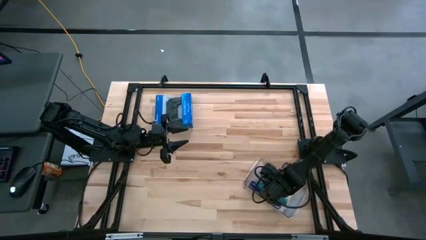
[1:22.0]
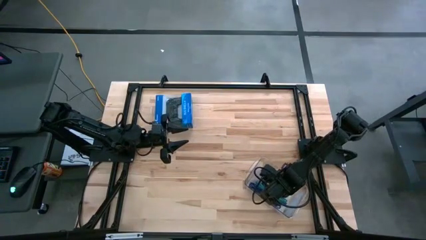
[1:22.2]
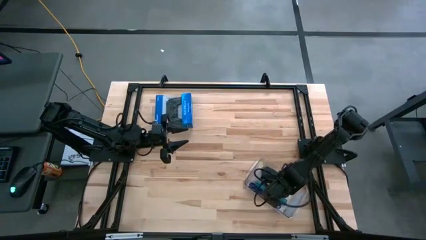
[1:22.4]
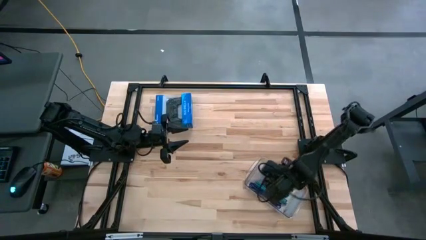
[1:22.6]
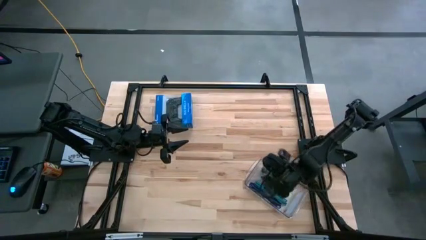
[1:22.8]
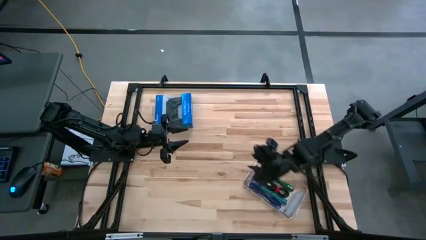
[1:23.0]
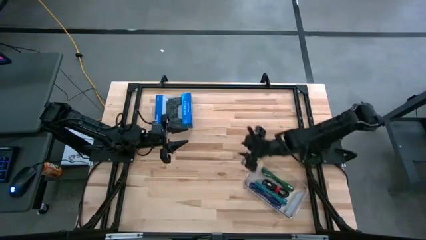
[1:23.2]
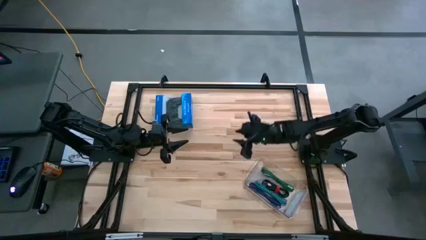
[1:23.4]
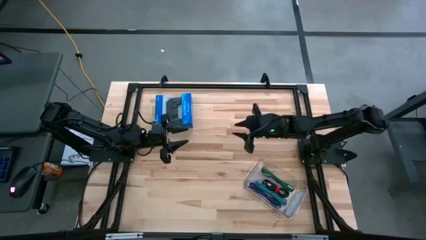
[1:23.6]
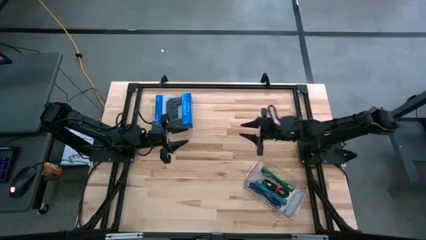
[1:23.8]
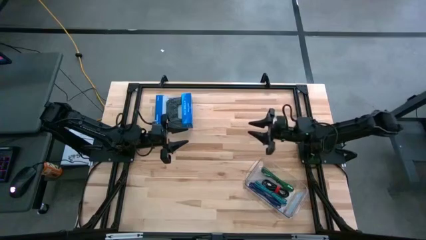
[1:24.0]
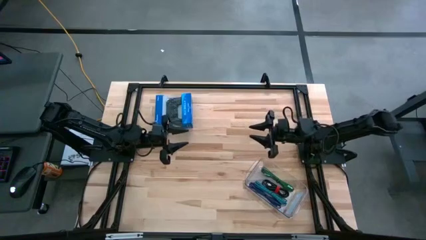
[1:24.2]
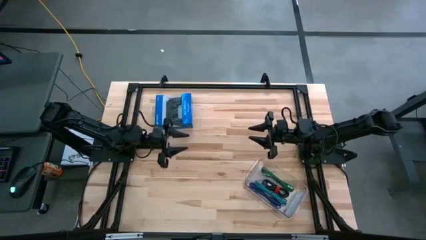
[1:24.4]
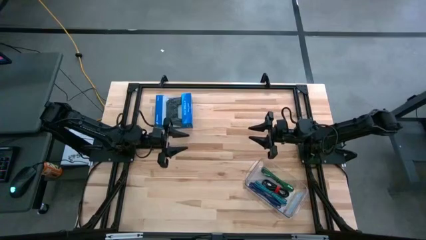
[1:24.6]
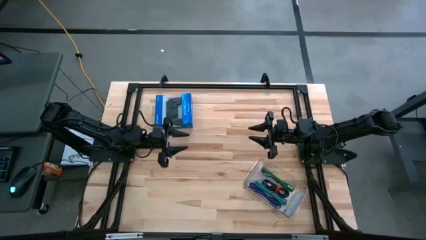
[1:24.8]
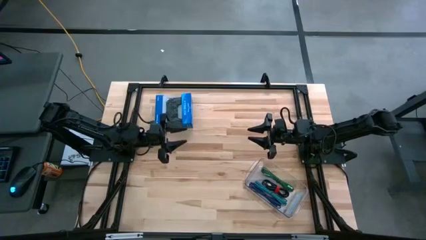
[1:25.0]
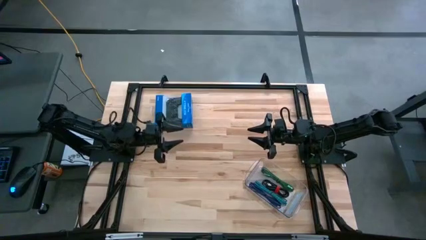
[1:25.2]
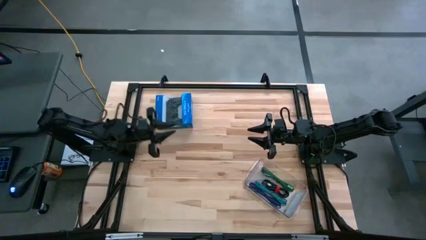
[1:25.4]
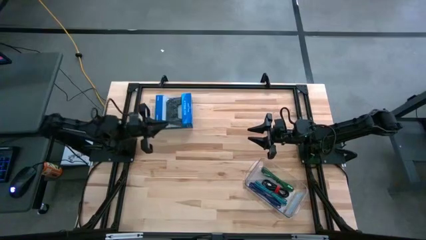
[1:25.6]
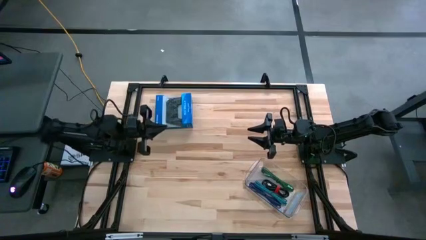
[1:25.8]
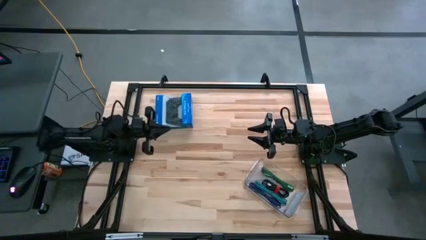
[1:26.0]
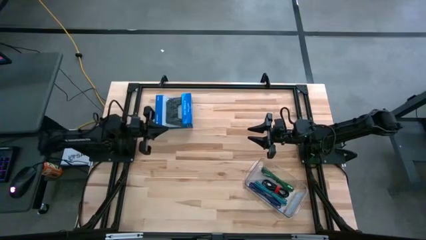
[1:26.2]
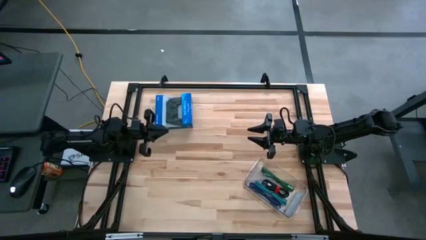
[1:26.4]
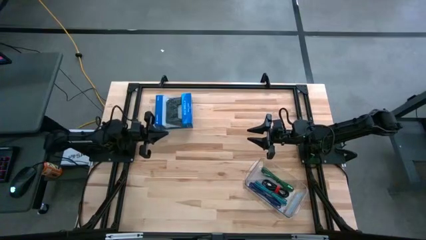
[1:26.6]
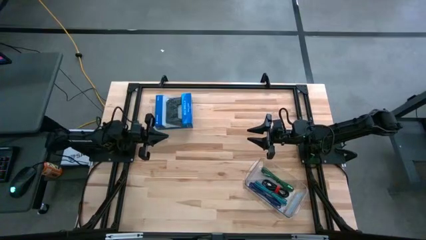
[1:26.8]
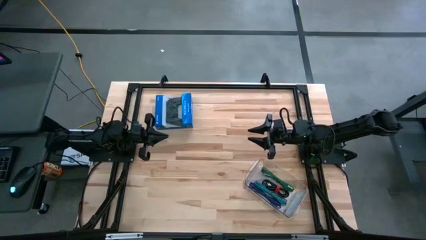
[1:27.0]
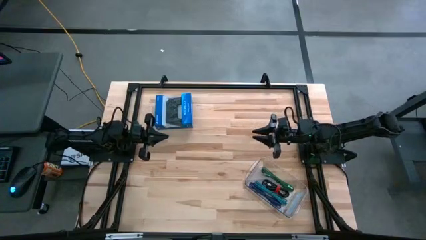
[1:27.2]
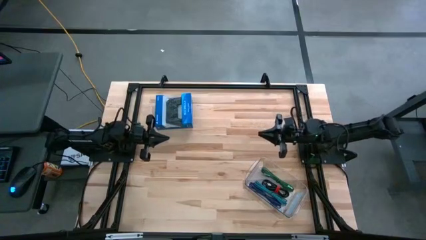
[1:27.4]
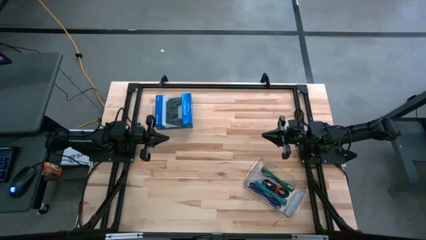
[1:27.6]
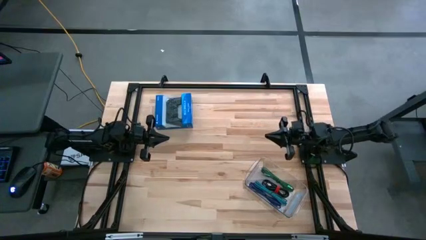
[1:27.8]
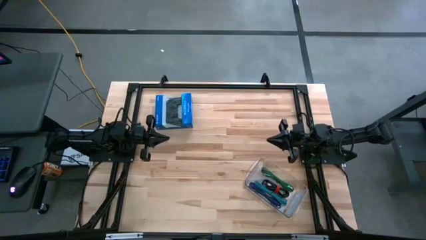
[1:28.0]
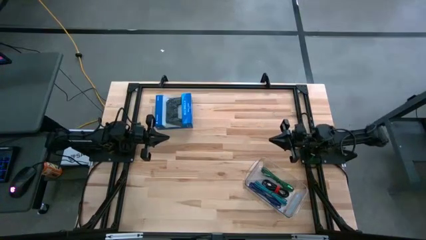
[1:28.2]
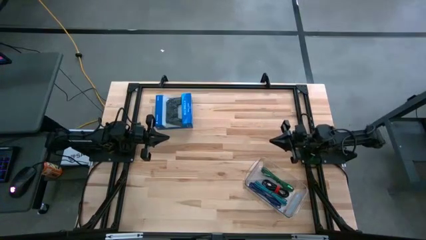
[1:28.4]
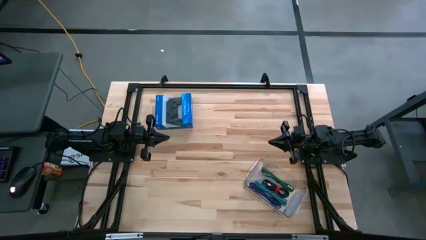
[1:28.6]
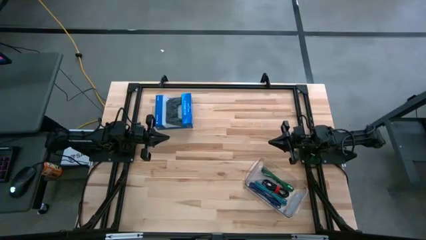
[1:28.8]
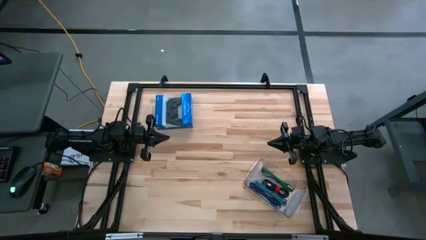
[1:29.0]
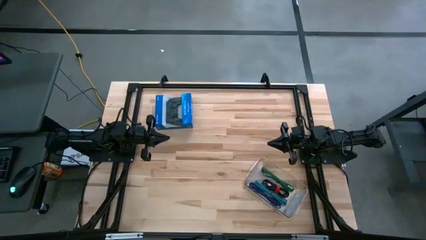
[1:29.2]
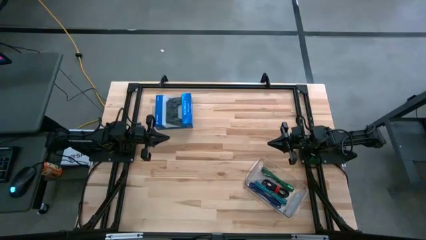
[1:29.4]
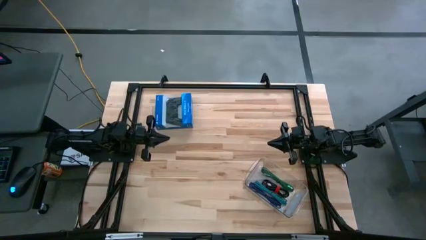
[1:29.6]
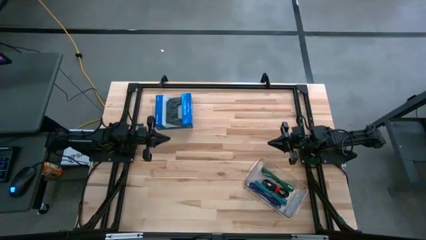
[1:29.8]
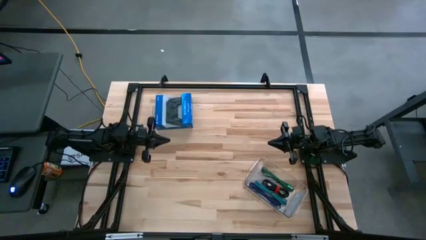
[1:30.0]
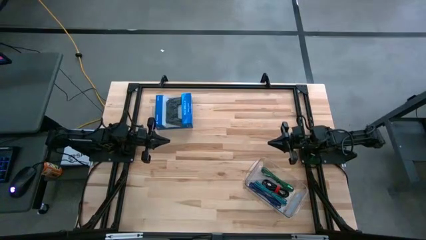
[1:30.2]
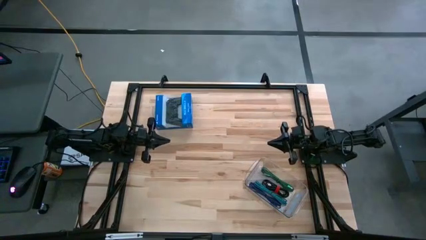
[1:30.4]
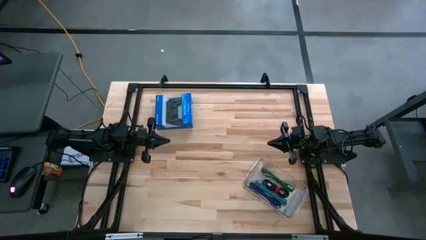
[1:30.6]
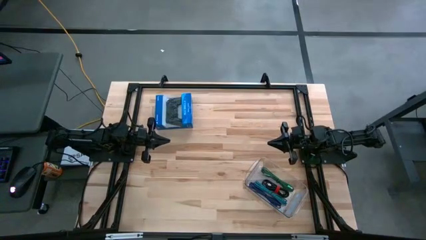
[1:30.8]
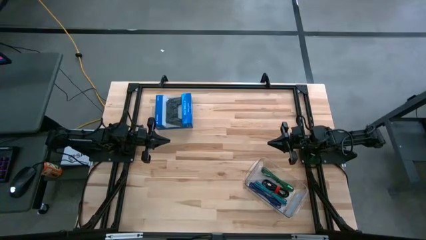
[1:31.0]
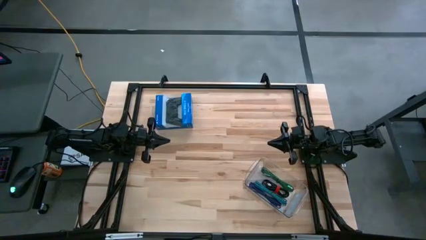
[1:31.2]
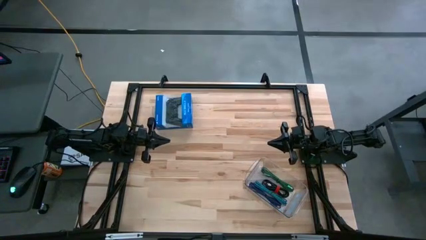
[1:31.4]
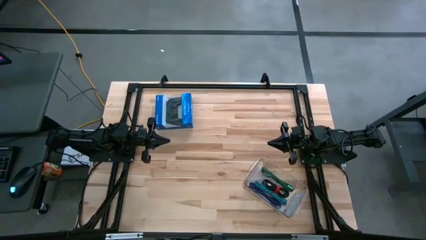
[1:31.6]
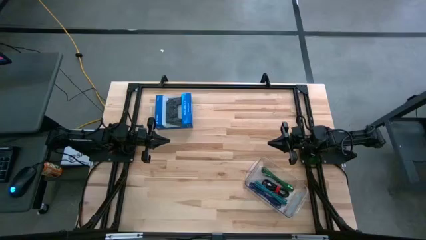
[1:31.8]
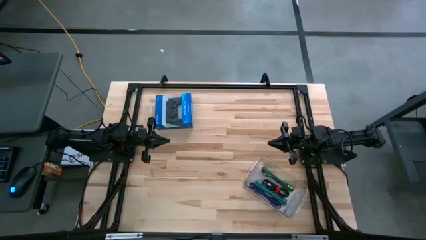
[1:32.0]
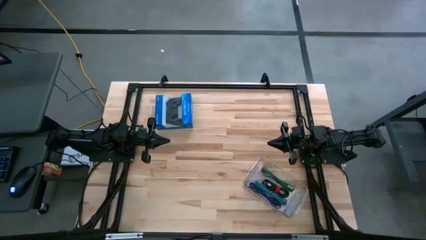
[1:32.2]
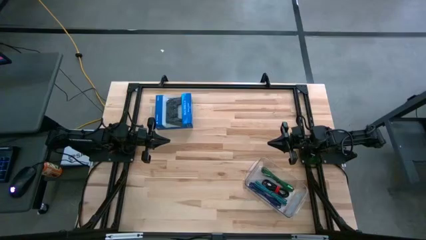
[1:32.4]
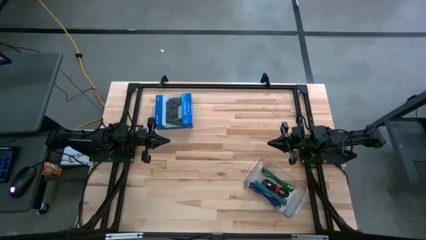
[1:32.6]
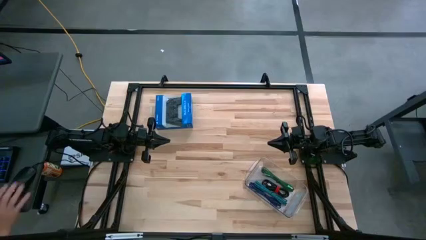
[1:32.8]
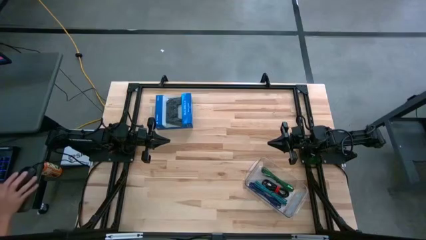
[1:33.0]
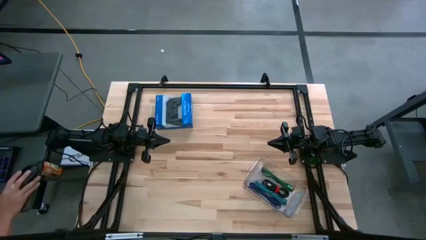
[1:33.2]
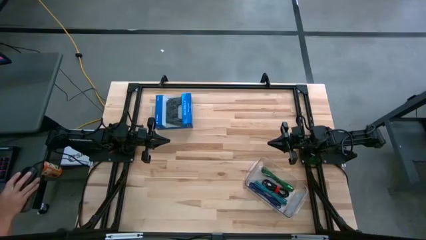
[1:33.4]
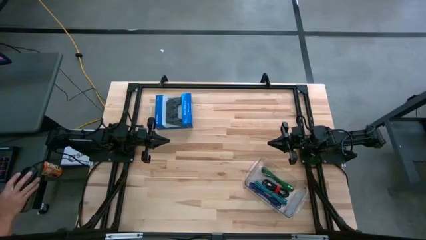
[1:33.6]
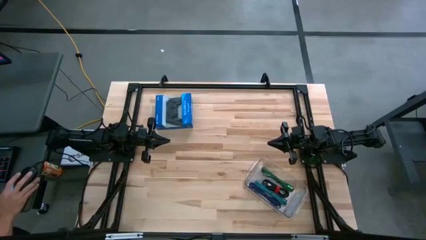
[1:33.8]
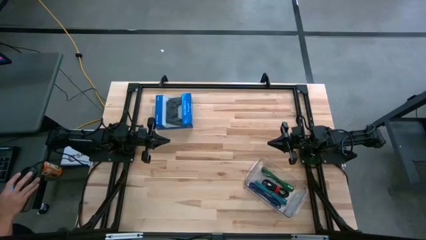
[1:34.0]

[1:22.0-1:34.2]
Task: Pick and place USB-C Cables
Return to Home Position
